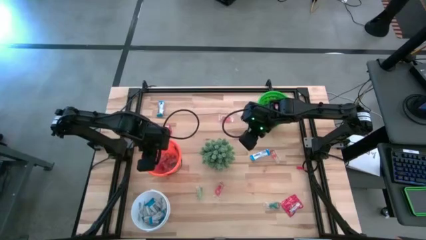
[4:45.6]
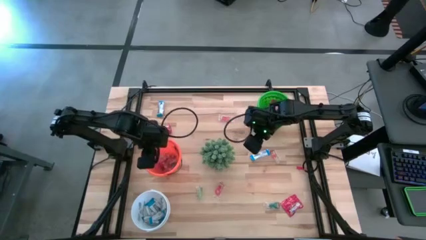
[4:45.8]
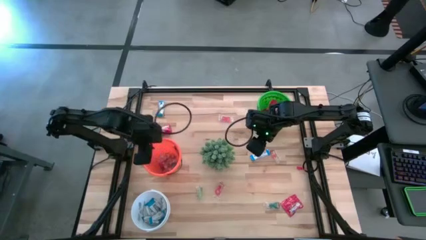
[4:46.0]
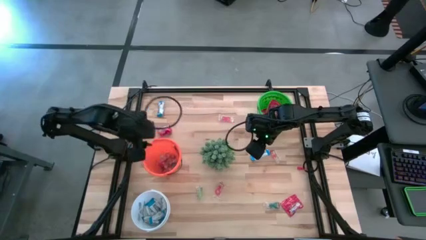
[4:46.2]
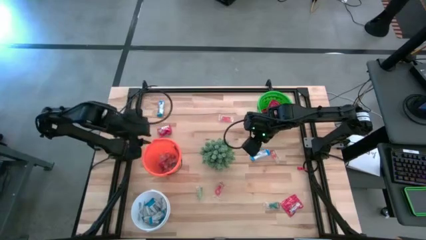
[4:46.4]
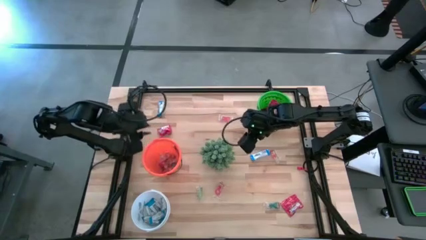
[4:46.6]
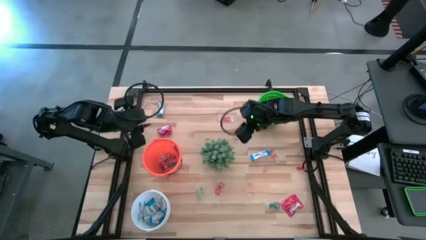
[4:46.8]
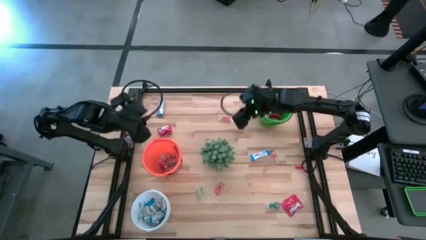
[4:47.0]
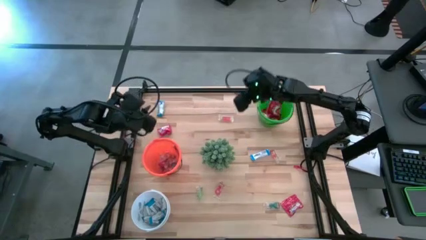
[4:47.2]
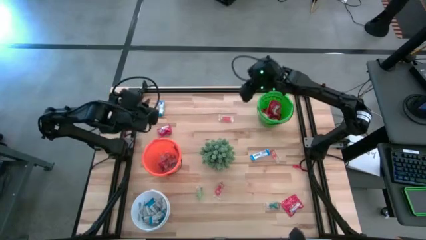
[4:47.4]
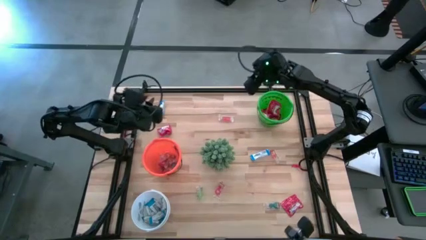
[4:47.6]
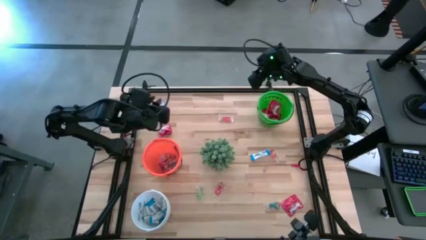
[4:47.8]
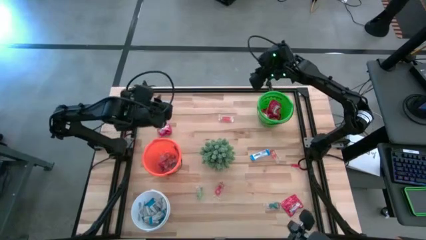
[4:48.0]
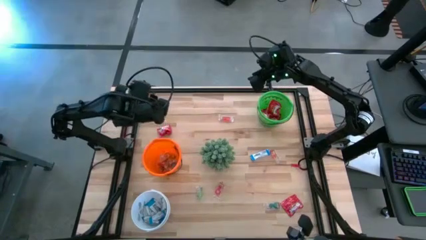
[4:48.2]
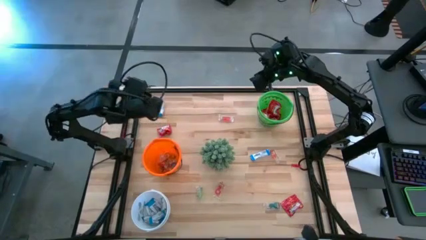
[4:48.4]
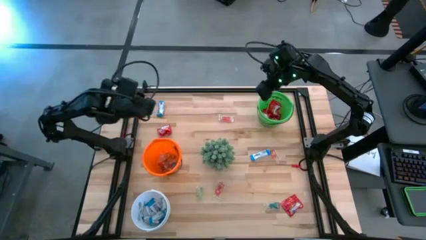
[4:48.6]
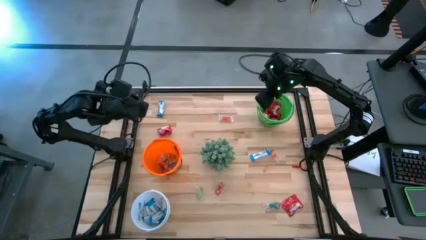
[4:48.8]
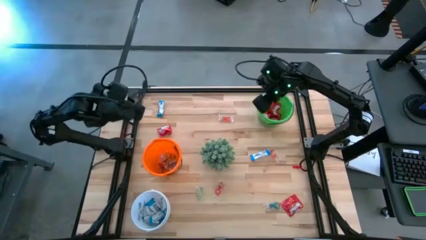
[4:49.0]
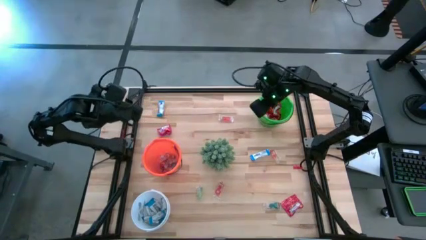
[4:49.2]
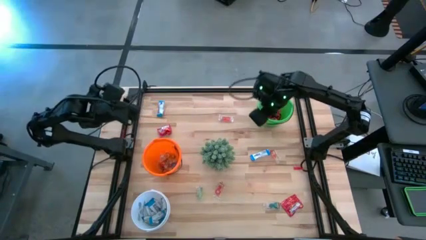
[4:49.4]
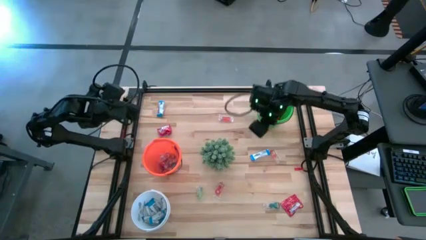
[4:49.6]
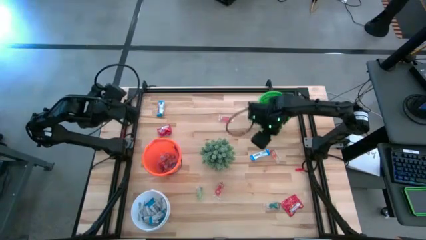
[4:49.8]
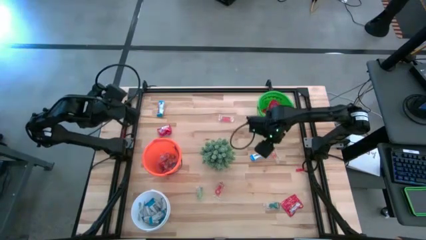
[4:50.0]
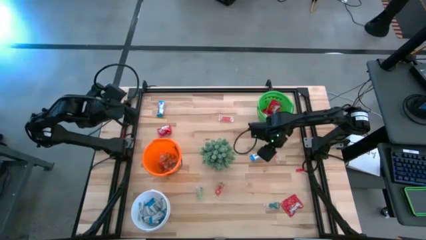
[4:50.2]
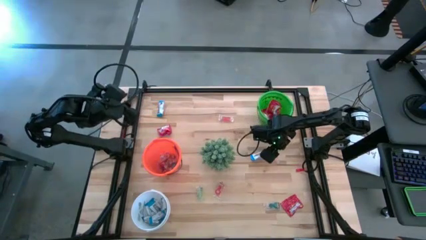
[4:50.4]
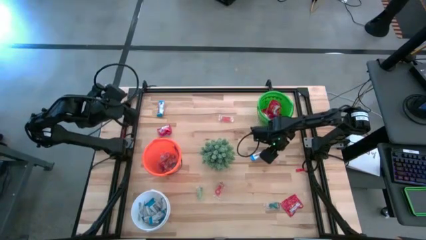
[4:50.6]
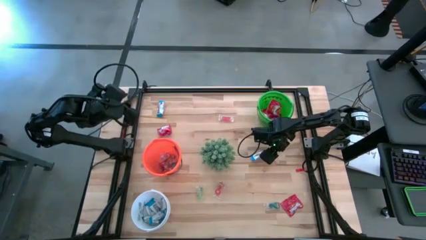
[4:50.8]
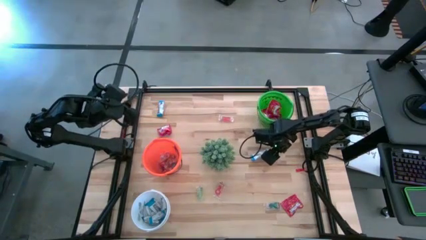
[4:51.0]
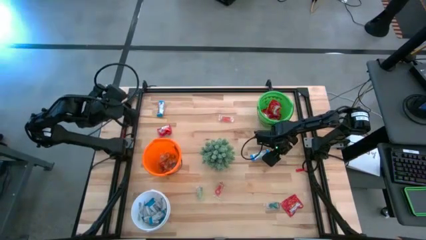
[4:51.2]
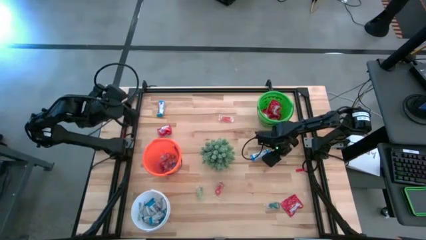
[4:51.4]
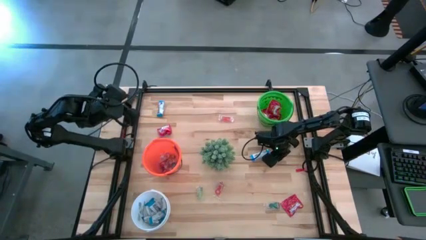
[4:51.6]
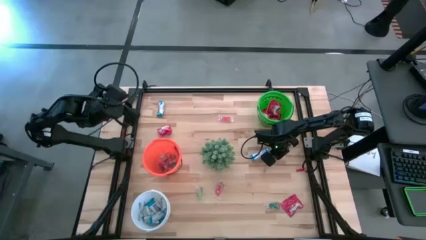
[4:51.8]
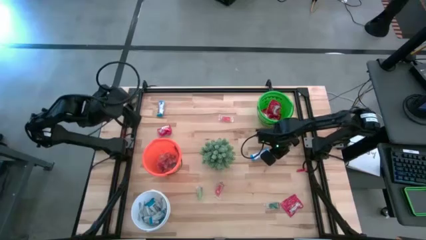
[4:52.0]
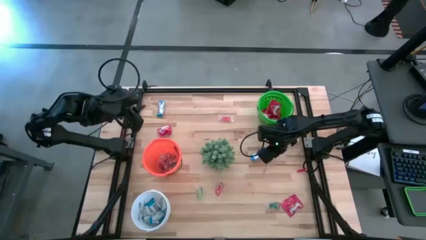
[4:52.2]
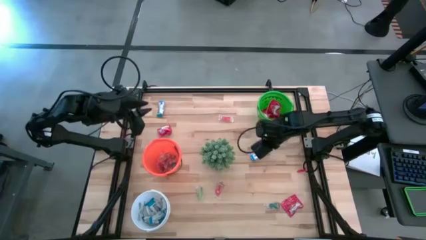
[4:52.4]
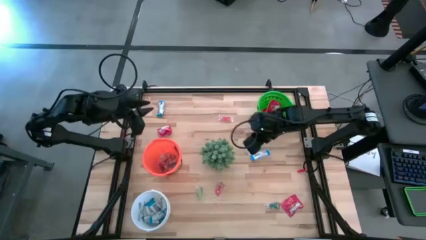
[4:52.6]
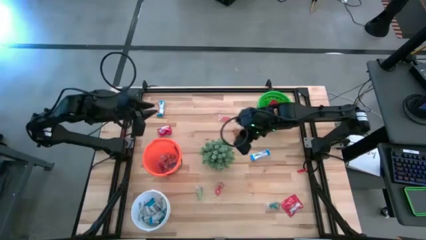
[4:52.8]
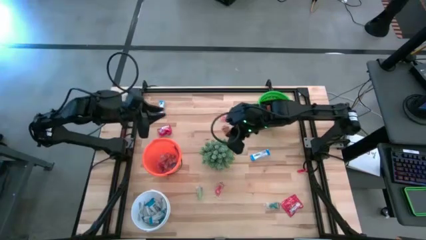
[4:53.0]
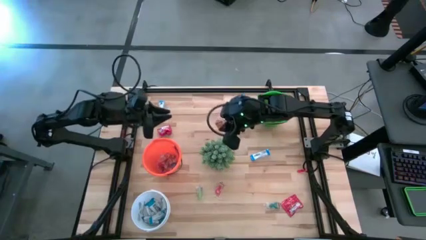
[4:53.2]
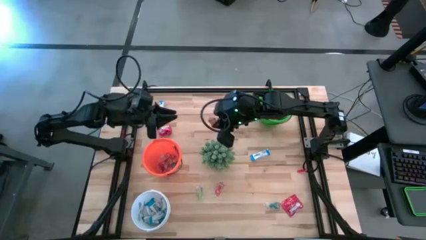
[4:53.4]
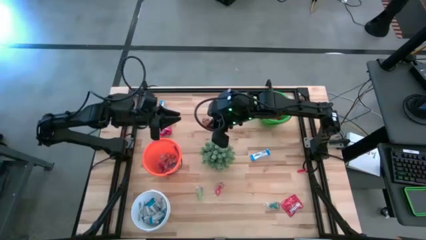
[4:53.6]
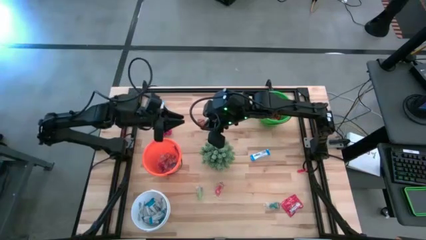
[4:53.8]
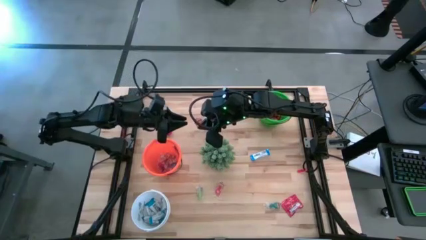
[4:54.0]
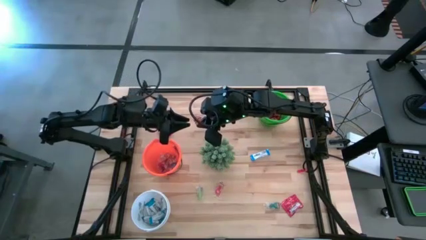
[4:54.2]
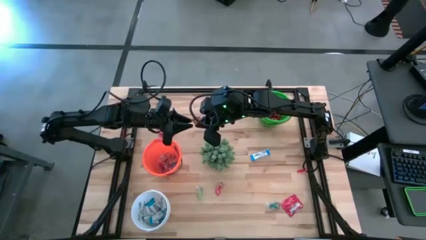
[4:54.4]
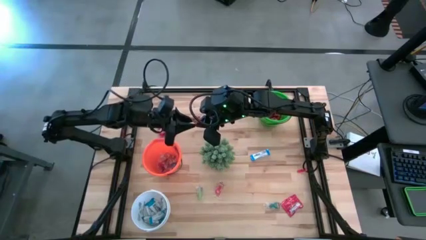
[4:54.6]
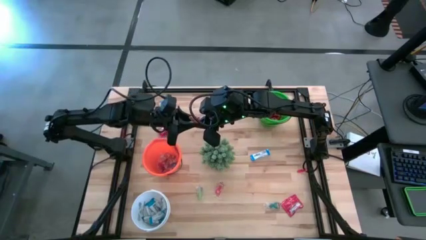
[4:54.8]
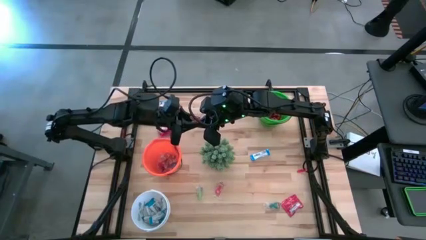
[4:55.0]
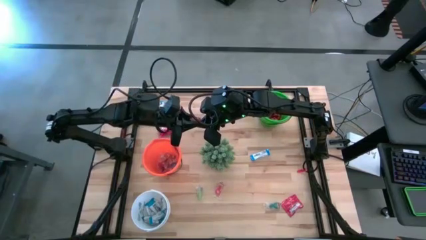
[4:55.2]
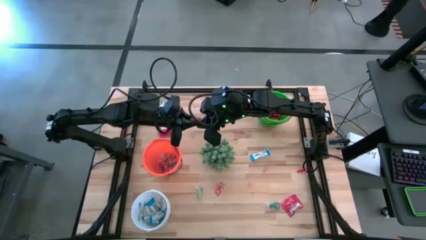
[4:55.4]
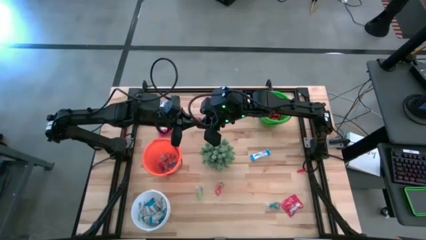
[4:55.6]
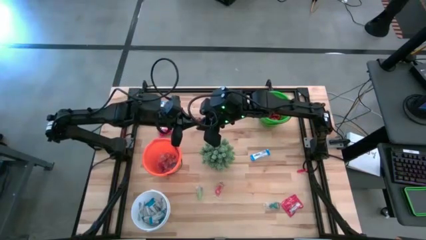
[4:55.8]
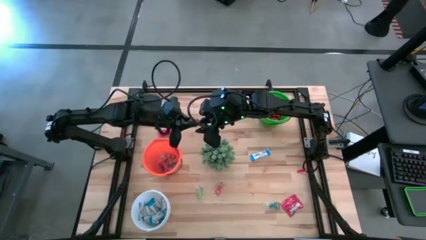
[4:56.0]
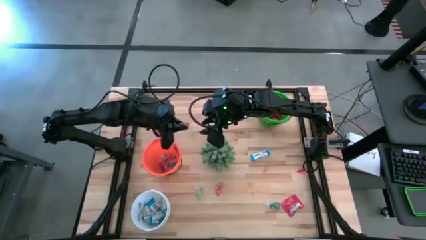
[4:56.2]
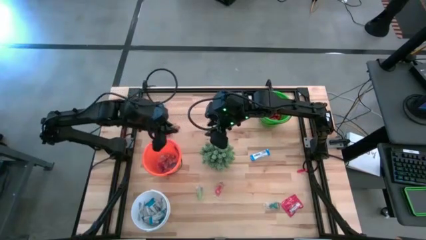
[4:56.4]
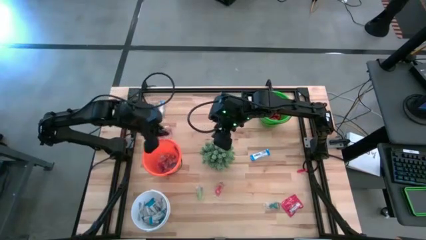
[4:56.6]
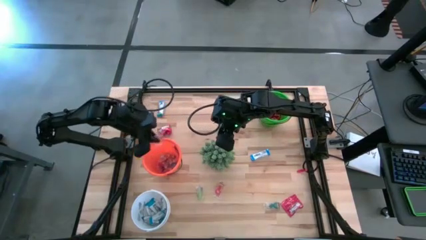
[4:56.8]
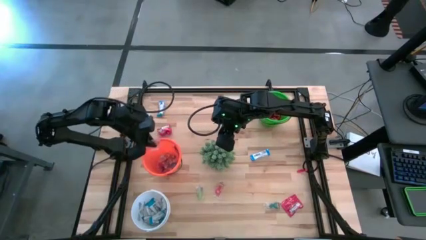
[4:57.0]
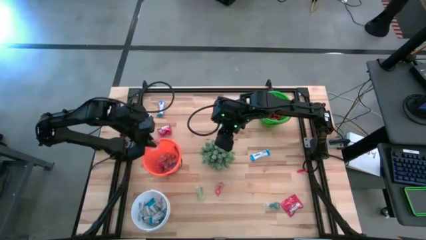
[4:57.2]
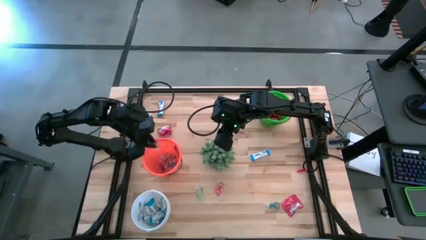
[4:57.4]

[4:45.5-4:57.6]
Task: Sort candy
Put the orange gummy into the orange bucket

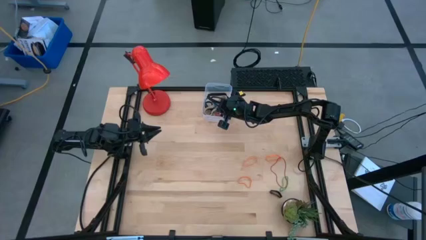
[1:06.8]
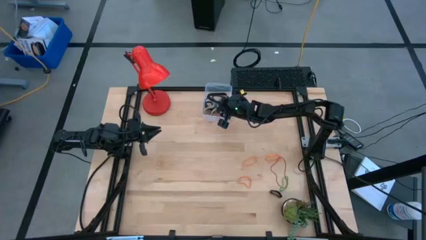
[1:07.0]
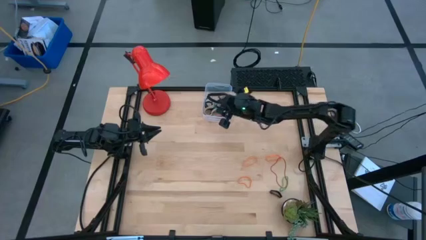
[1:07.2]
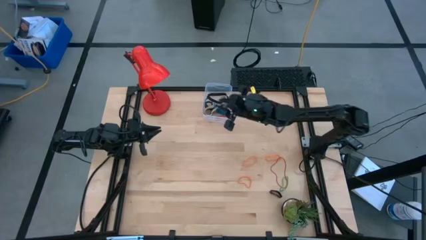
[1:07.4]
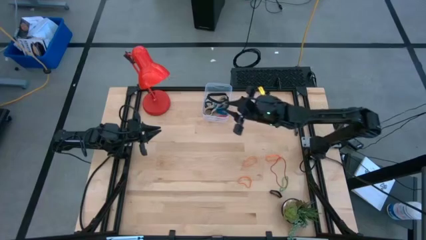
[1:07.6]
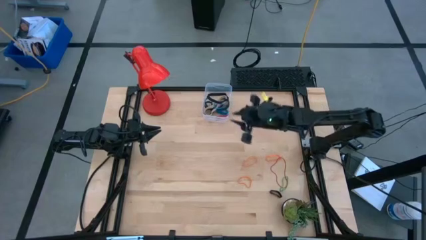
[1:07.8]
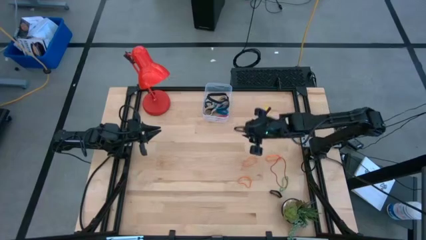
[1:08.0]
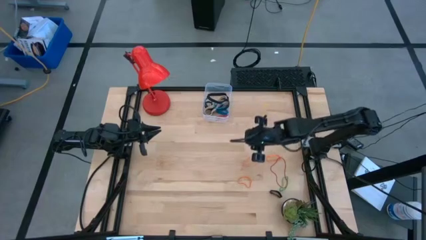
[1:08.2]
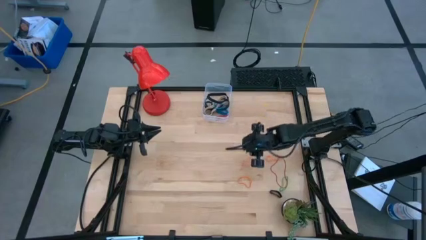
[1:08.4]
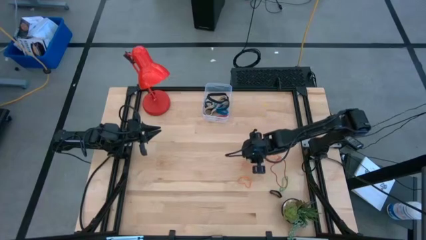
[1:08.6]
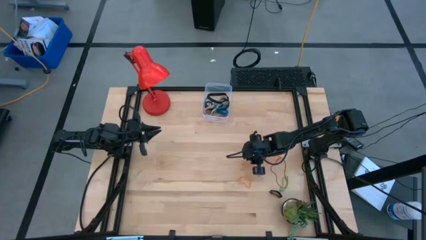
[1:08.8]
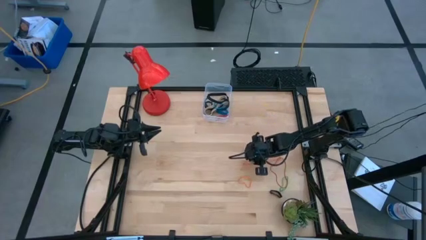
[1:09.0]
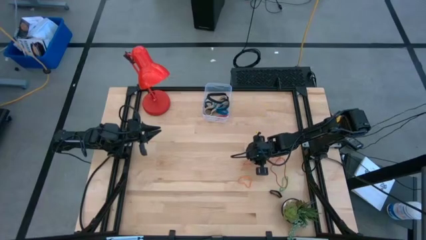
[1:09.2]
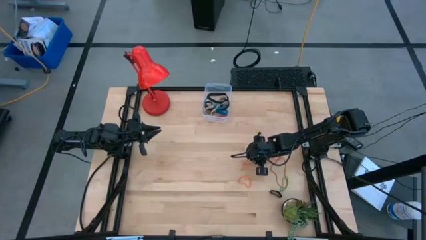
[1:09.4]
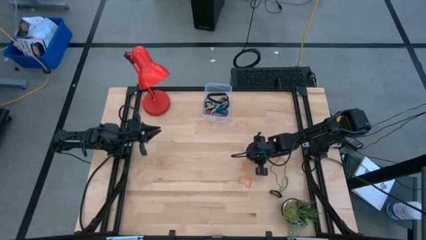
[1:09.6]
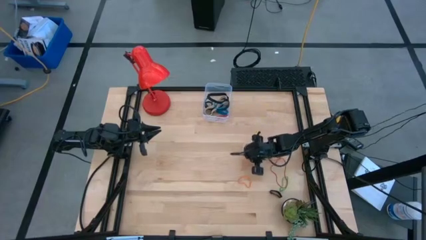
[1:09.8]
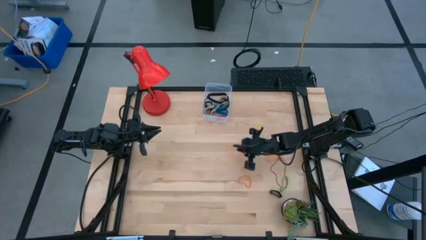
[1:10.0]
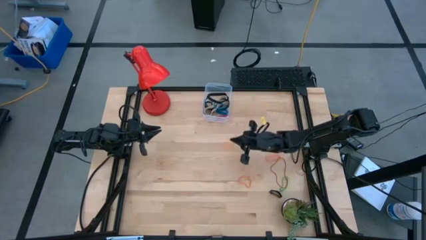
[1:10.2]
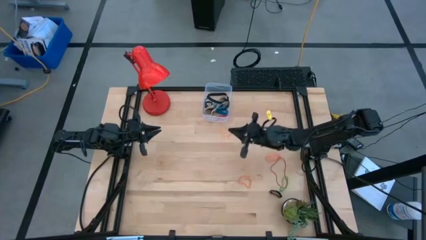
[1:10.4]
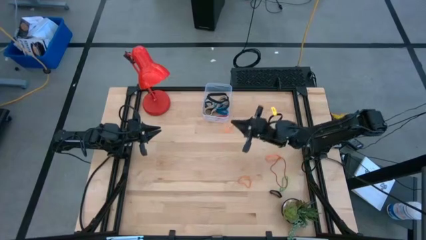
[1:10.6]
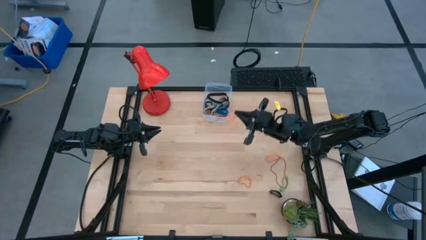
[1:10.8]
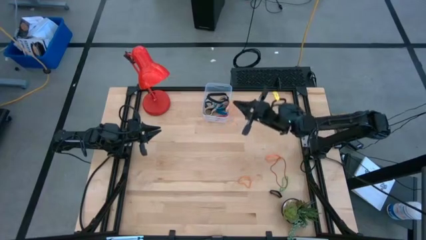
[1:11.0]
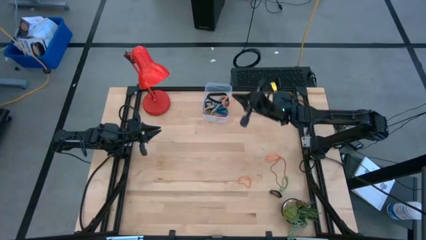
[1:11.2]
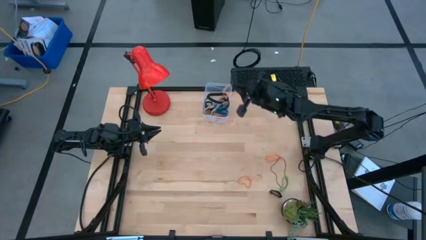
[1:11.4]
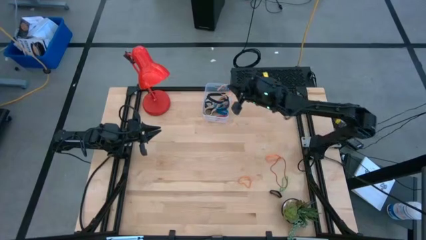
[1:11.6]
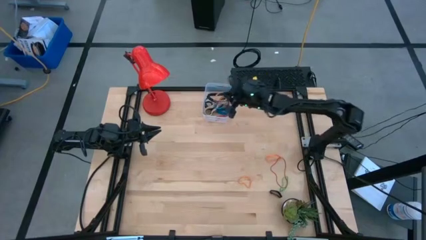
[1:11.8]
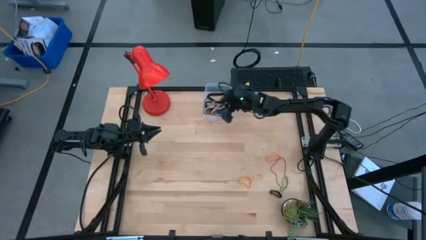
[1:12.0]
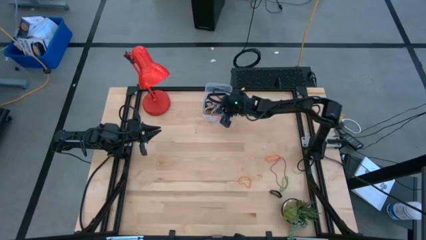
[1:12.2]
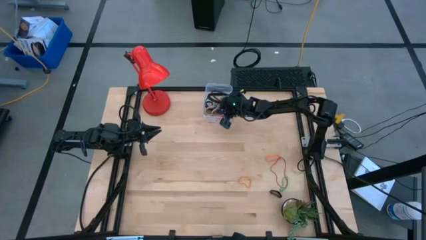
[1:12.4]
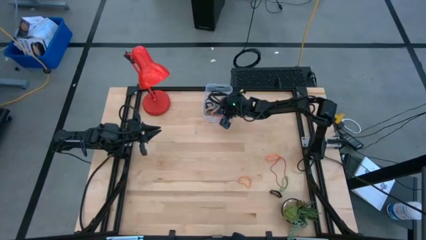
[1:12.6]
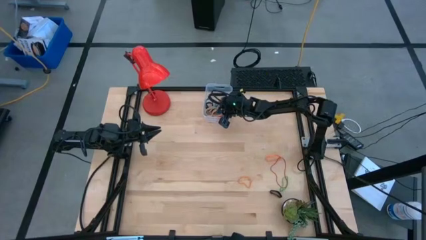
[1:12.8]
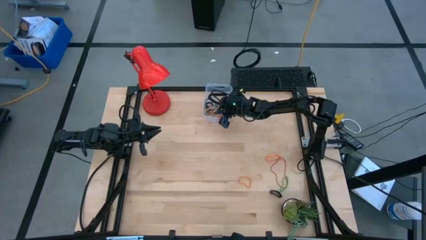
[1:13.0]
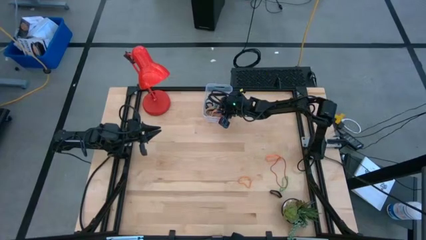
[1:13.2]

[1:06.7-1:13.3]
Task: Pick and place rubber bands into bin
Put the orange rubber band into the transparent bin
